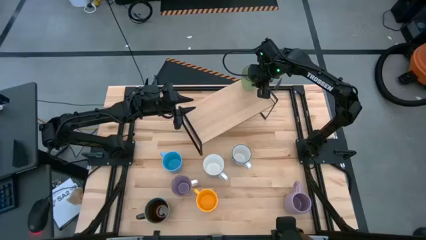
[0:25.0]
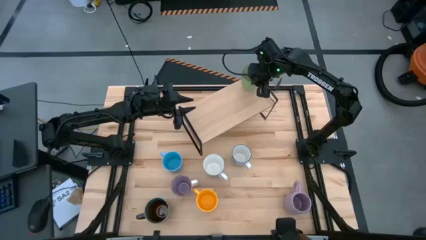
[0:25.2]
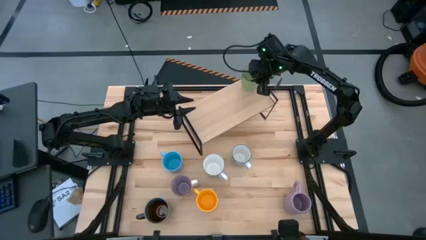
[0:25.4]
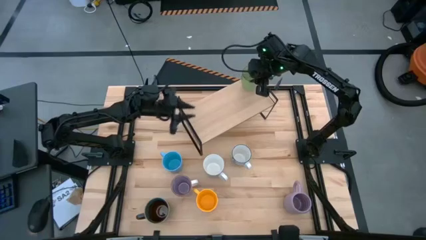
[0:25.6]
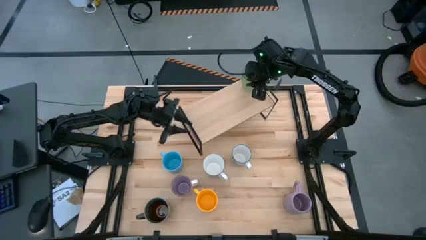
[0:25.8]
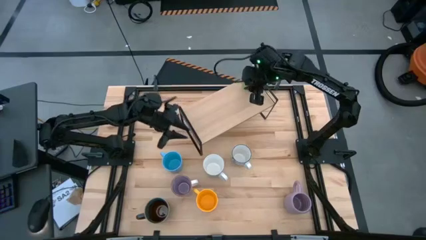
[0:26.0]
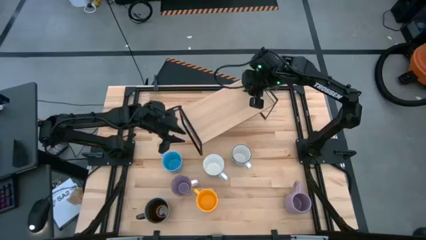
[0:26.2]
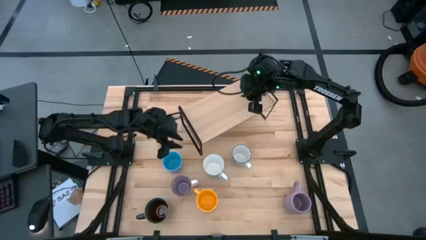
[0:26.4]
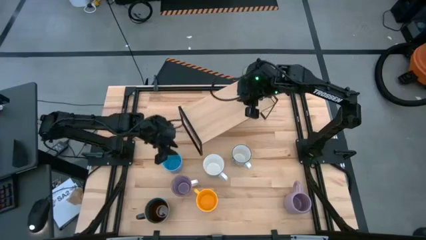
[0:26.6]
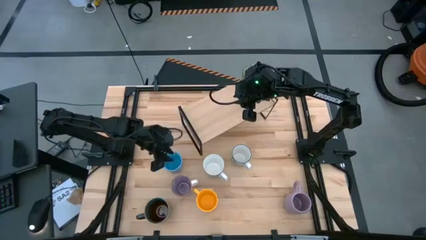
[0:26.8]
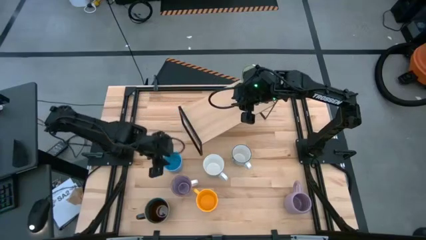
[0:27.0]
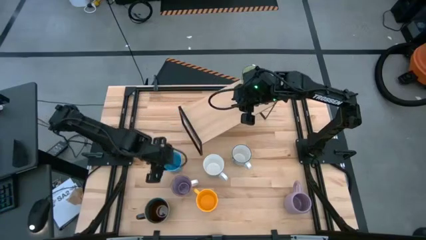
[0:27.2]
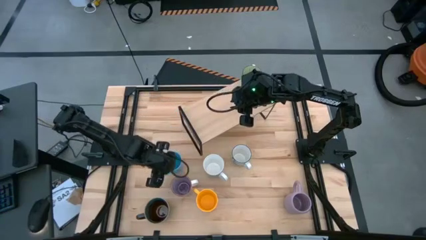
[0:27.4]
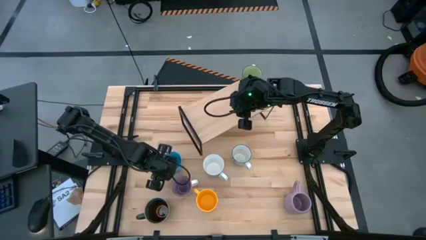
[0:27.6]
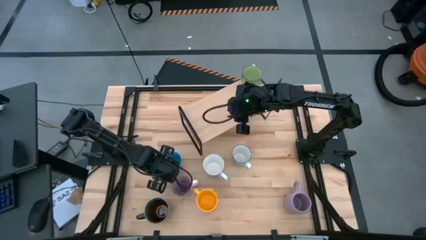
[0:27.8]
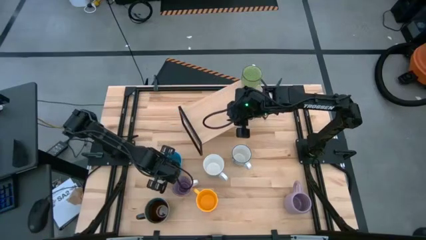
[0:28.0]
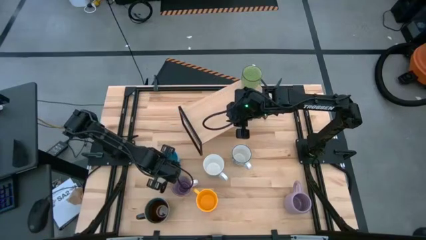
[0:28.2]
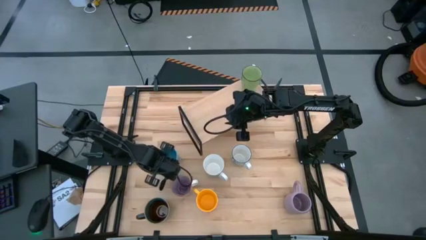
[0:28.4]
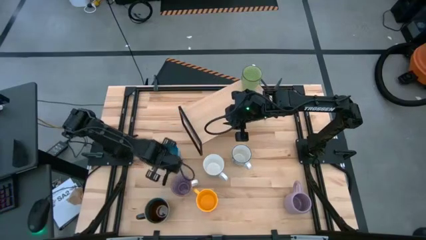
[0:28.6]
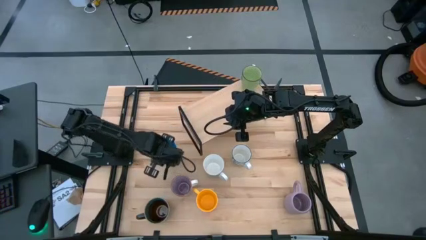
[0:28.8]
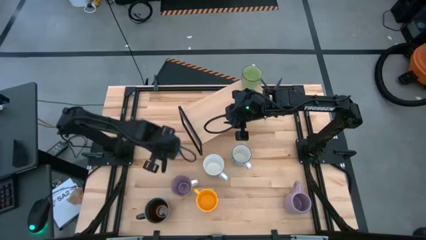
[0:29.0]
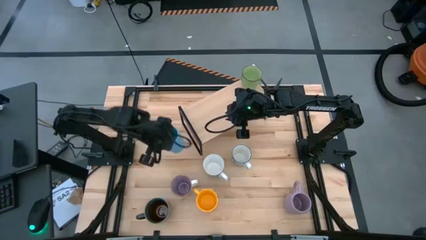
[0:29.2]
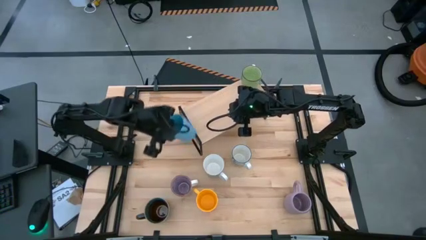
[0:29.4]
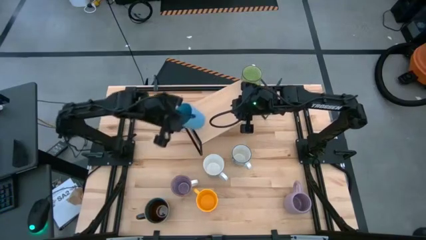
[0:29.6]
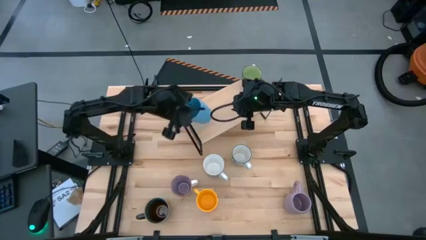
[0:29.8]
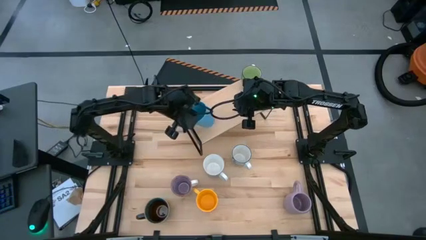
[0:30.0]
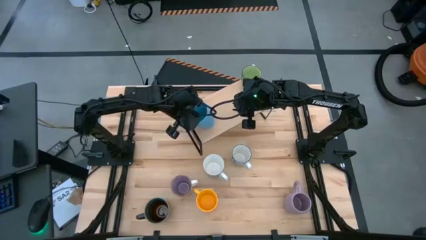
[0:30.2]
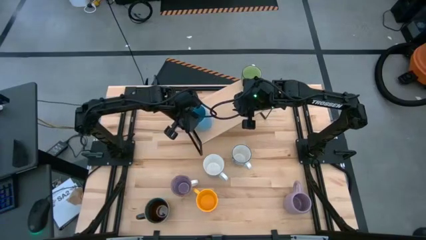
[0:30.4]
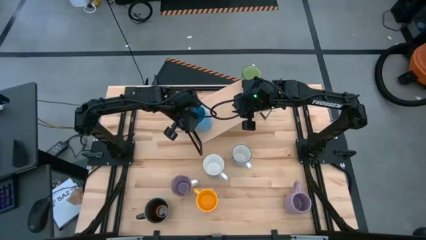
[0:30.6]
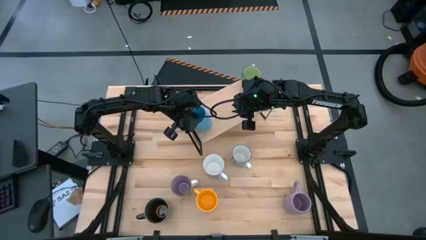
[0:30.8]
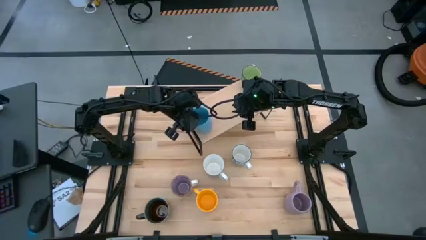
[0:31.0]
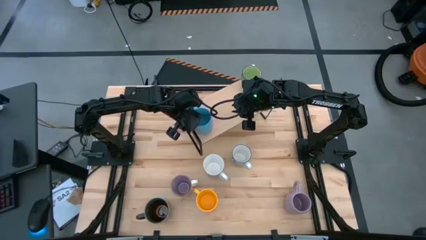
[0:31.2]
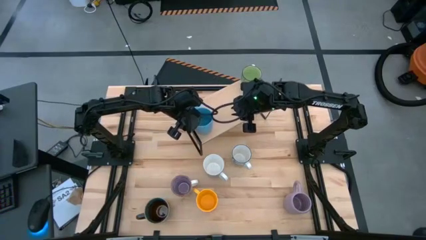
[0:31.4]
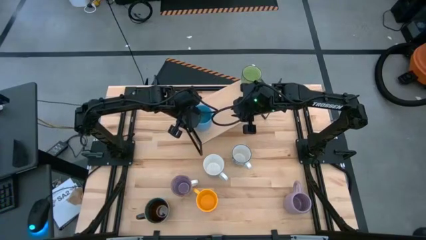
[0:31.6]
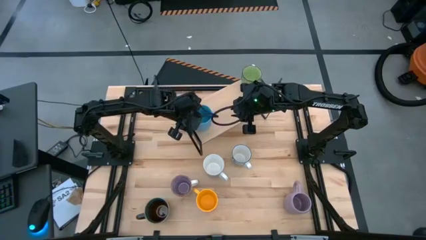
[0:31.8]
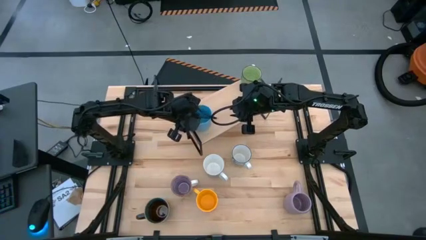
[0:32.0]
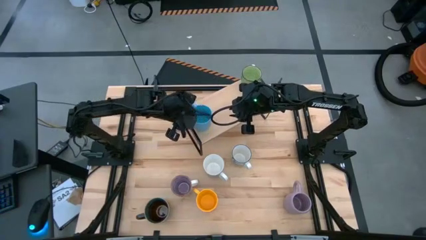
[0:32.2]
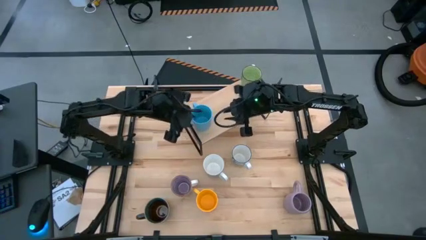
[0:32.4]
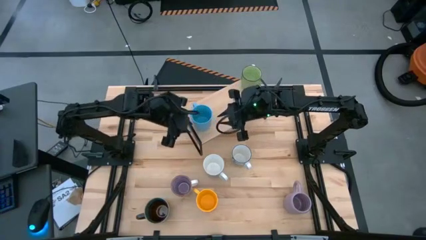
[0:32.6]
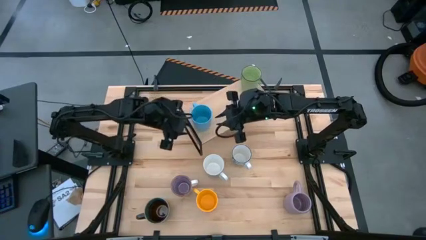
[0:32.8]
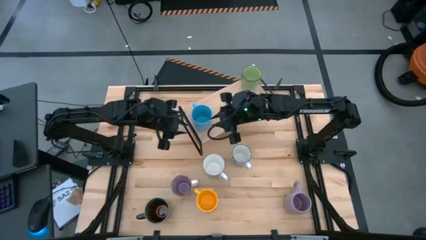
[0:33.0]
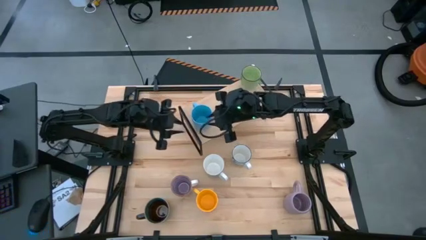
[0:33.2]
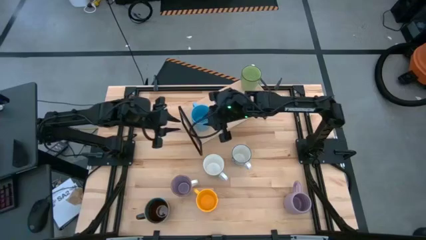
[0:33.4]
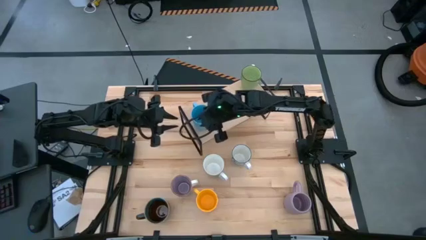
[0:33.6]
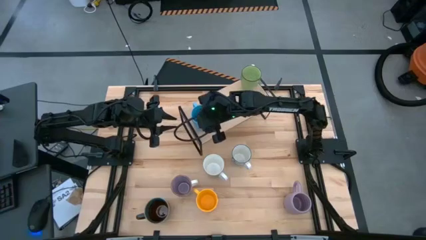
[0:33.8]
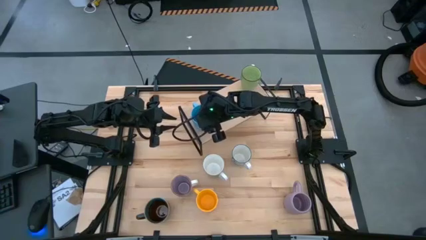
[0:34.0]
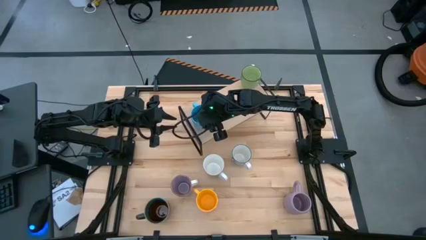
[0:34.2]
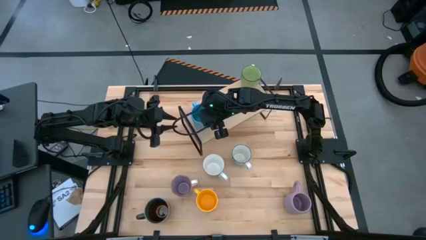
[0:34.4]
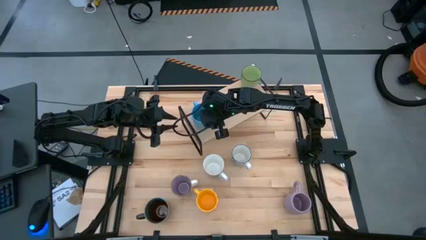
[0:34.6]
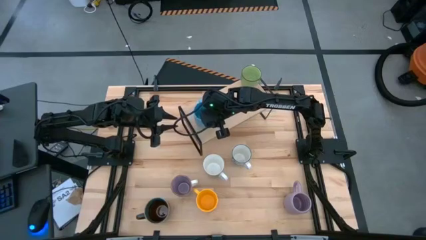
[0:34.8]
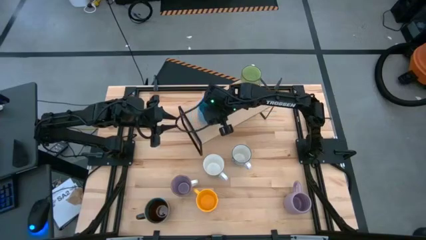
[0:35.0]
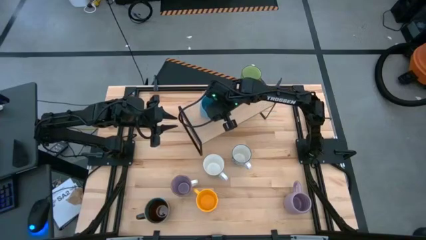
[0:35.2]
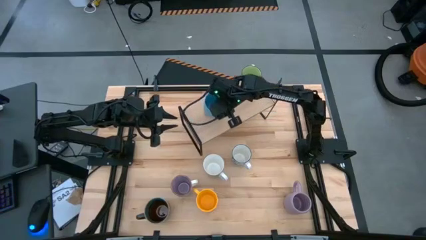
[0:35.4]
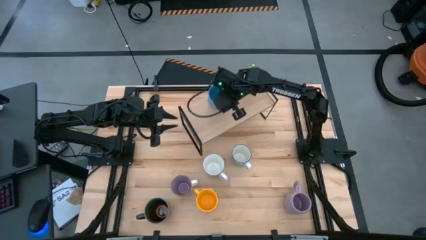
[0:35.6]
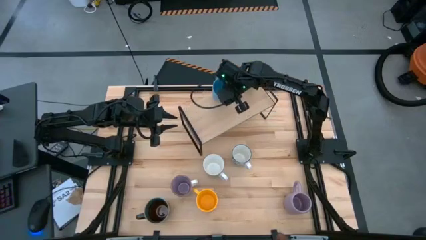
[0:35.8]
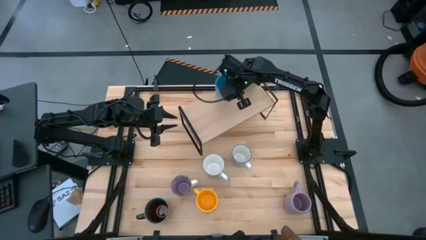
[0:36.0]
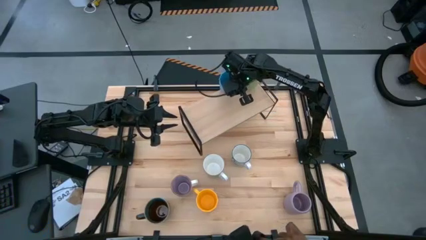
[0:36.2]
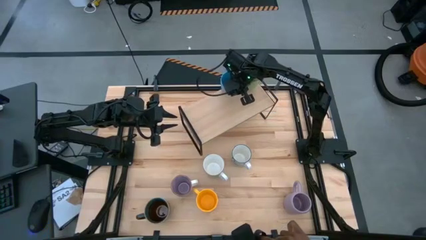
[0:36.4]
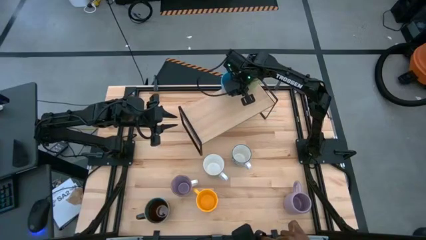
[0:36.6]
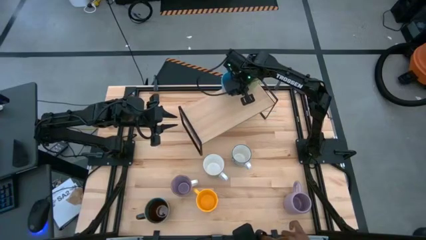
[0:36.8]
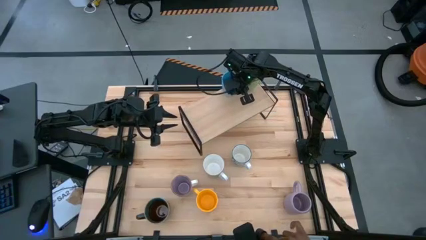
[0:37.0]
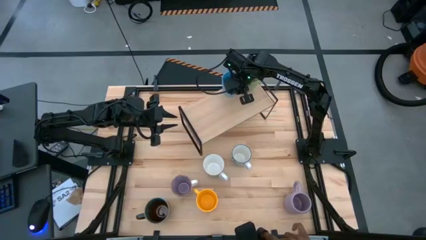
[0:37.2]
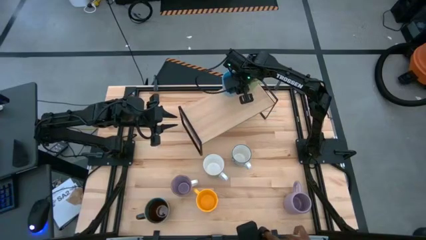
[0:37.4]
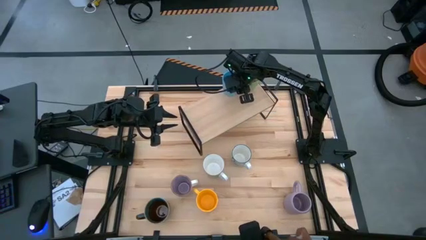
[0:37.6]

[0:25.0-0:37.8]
Task: Place coffee mugs
Put the light blue mug on the shelf
